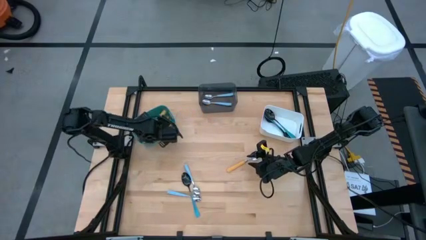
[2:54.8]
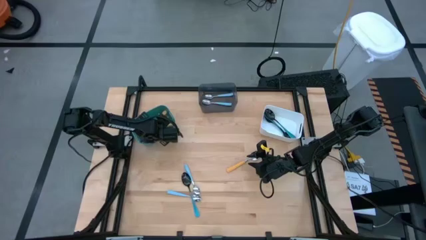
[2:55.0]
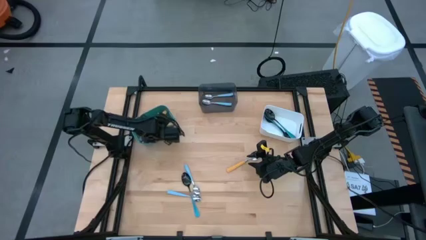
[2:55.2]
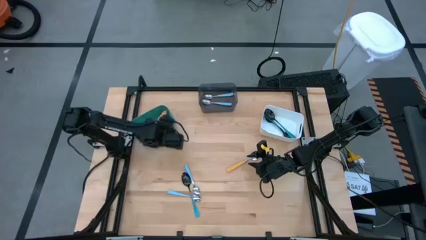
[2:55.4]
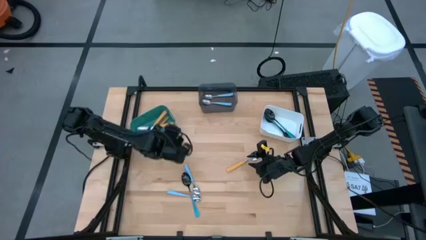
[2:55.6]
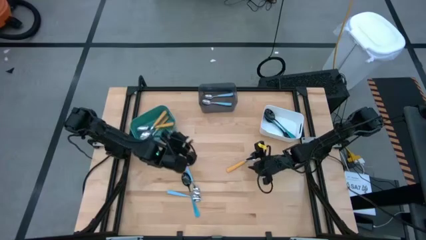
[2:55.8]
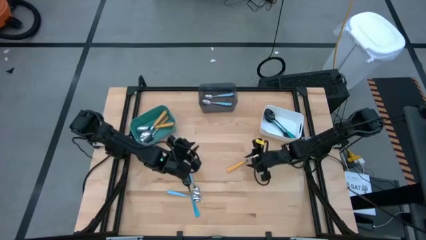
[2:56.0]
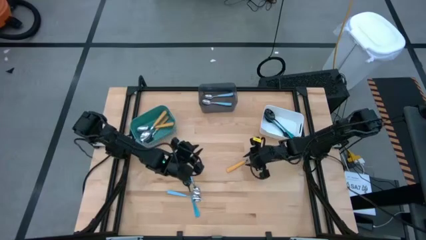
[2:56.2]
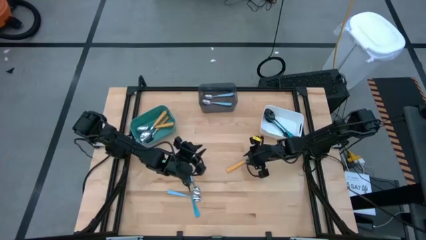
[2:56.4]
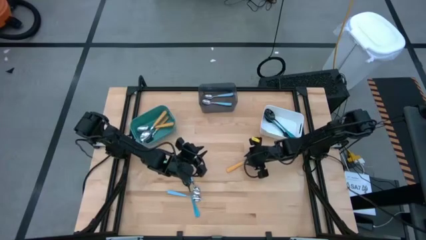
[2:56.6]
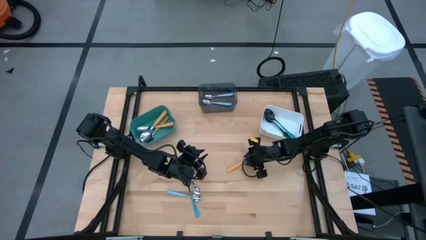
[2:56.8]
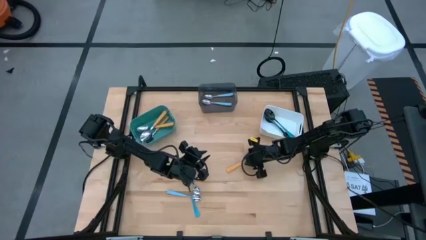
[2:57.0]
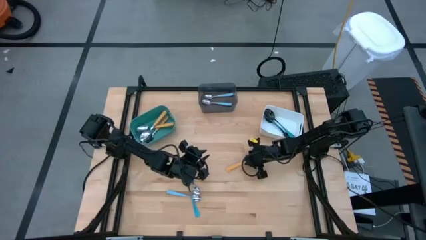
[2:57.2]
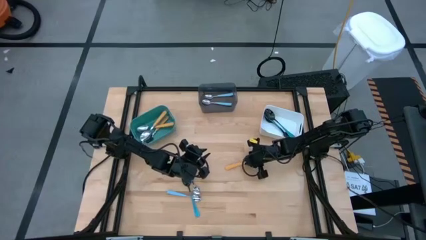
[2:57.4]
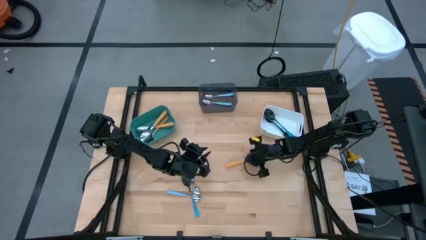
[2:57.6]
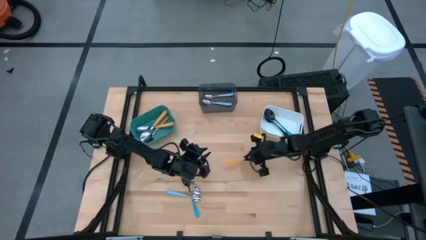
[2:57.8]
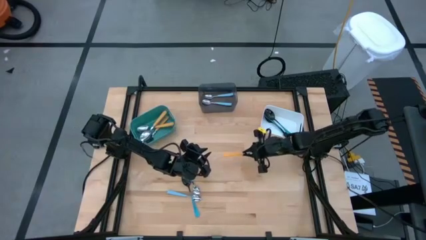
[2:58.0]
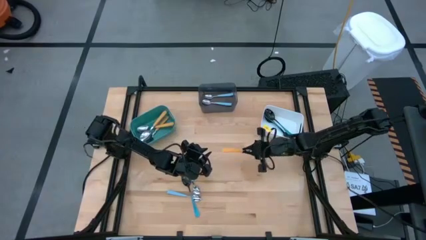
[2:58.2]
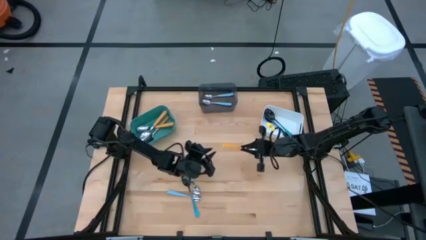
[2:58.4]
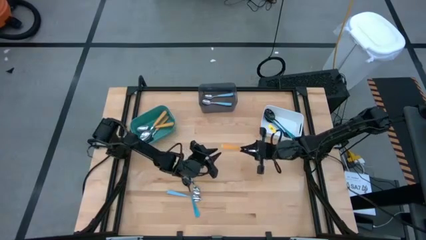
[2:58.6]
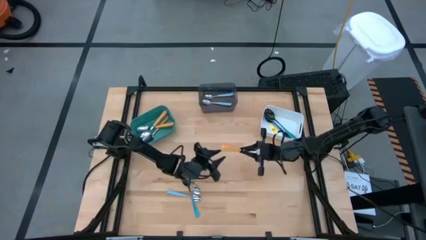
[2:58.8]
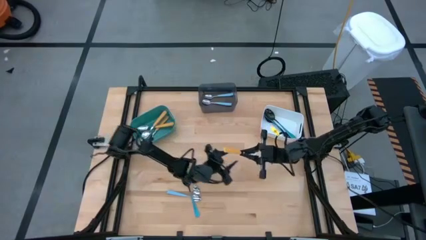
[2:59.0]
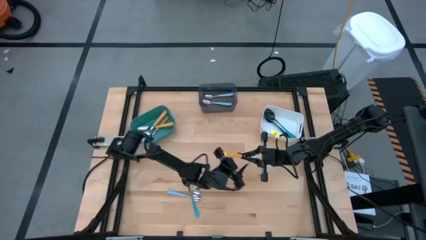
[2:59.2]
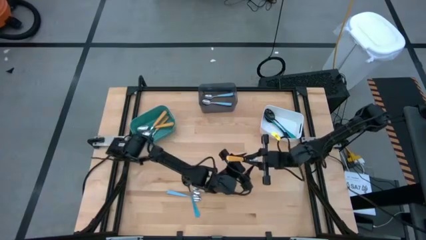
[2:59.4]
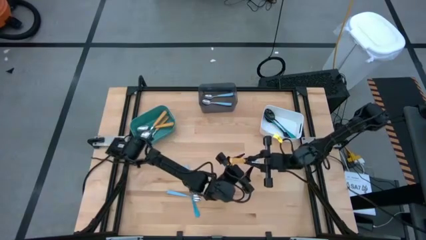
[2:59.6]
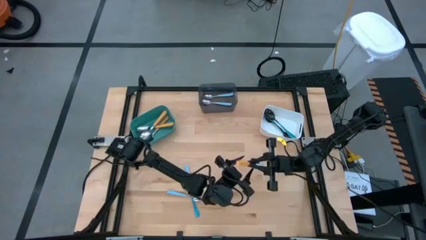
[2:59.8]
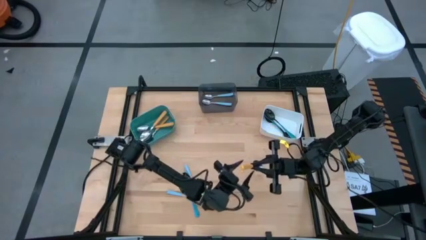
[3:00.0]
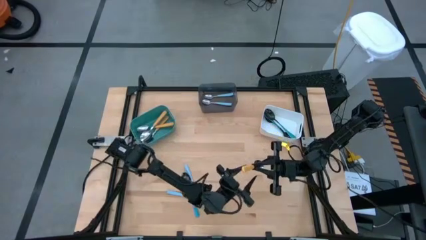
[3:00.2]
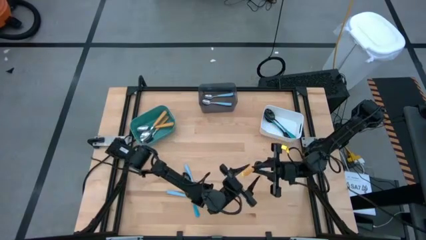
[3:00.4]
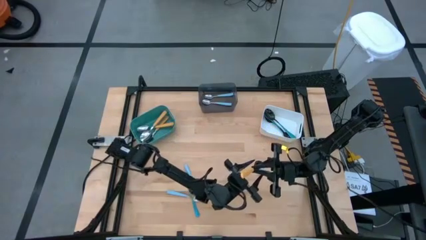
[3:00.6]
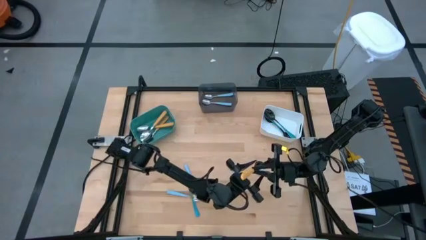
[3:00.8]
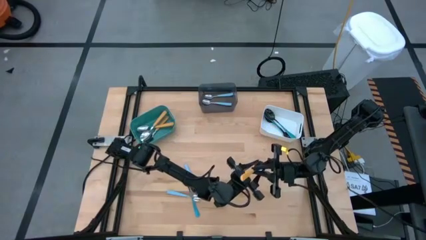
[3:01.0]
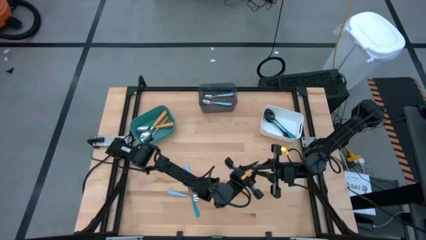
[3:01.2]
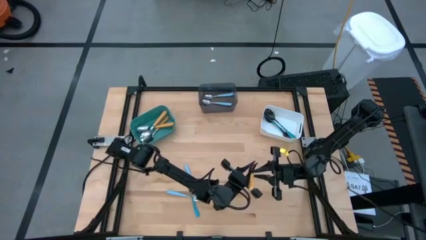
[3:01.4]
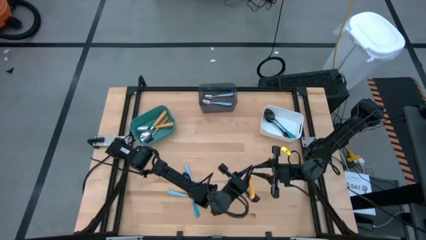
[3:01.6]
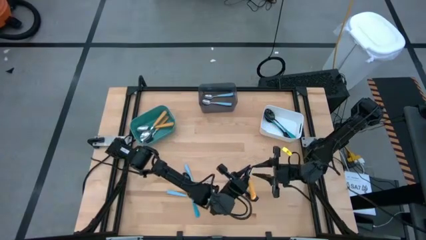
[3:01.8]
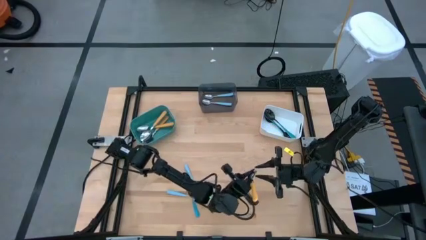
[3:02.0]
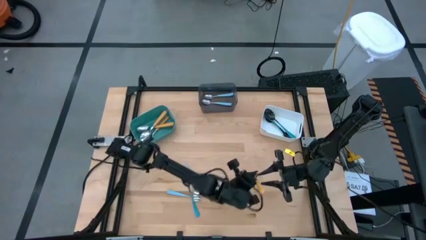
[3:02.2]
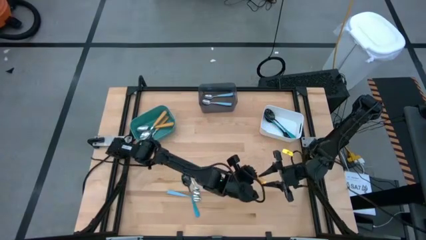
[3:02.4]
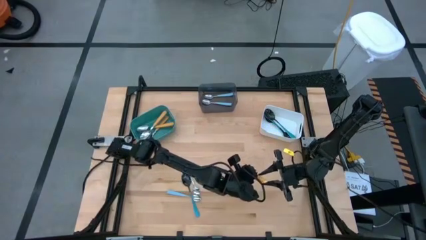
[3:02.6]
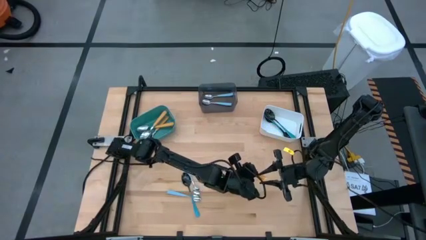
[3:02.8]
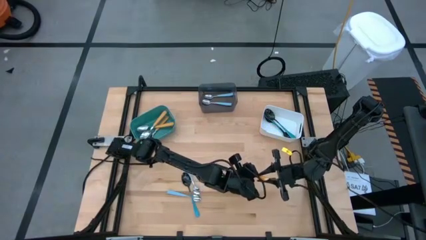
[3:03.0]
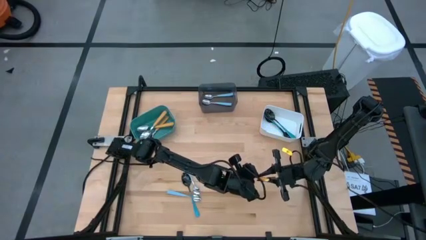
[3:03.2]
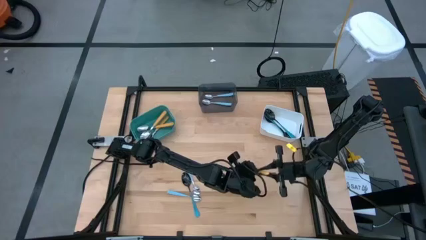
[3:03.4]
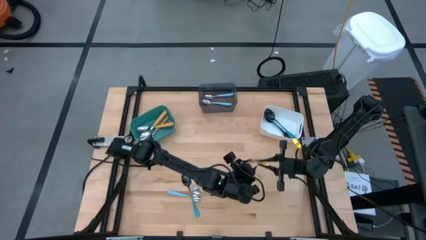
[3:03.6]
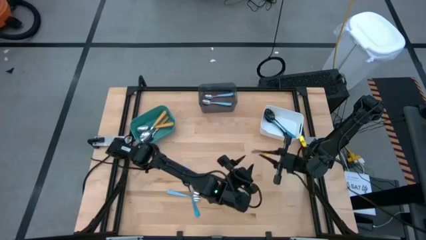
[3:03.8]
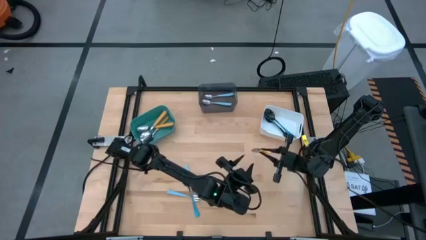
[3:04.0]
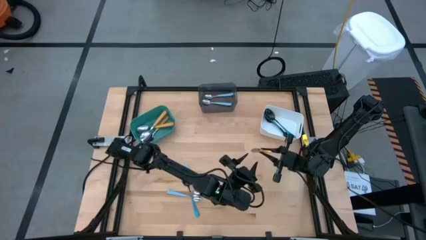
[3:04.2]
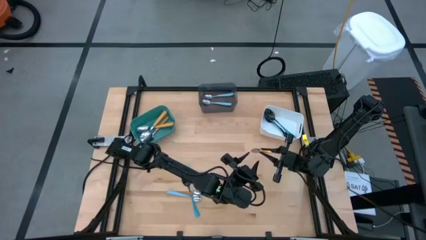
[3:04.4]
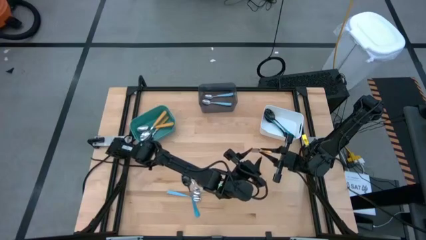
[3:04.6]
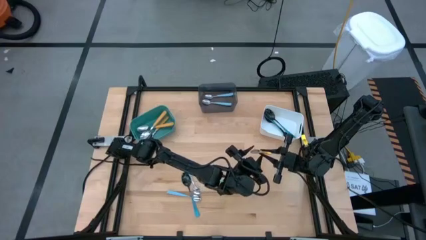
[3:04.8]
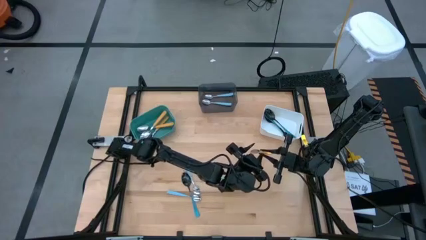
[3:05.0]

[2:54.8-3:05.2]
Task: Sort silverware by color (type)
Put the yellow spoon into the green bin
